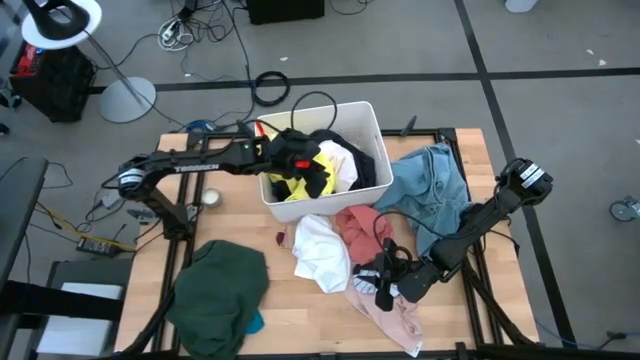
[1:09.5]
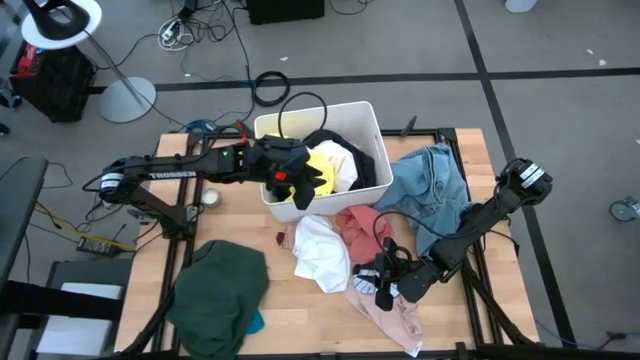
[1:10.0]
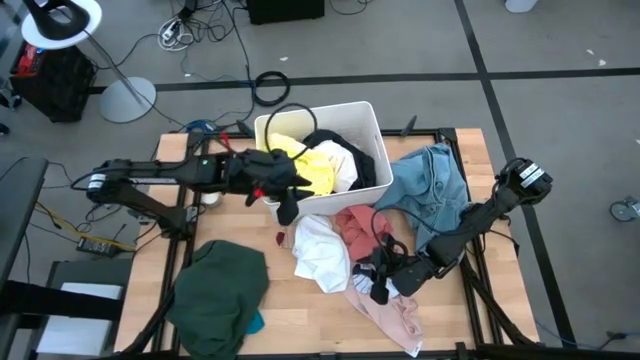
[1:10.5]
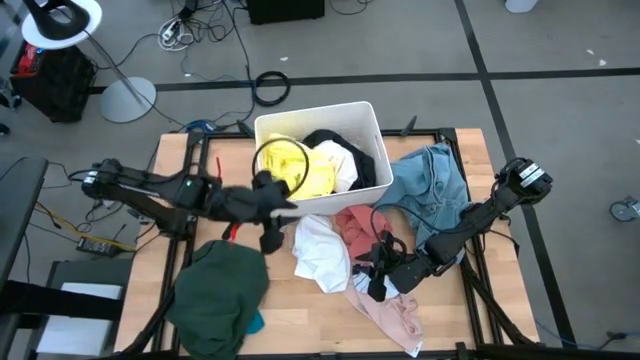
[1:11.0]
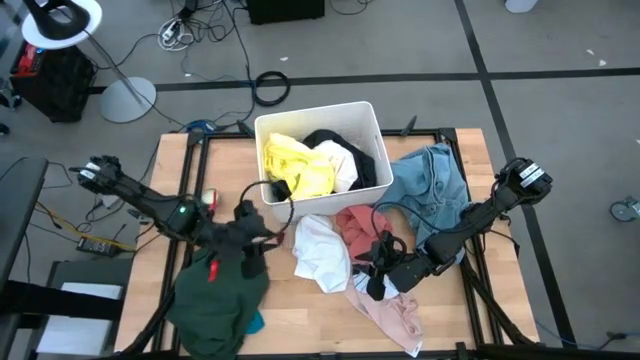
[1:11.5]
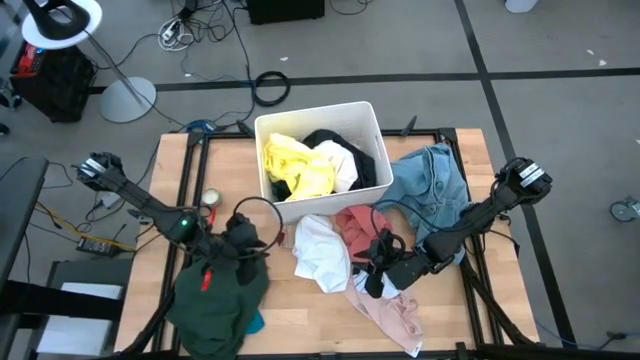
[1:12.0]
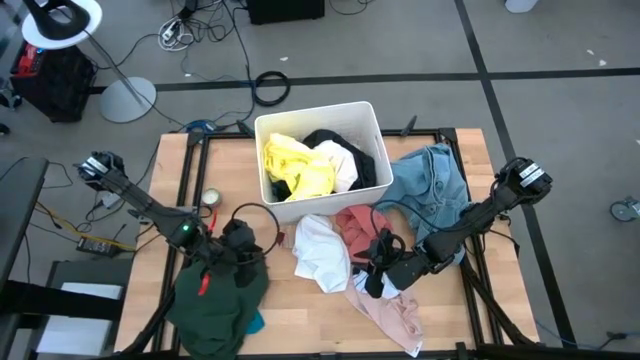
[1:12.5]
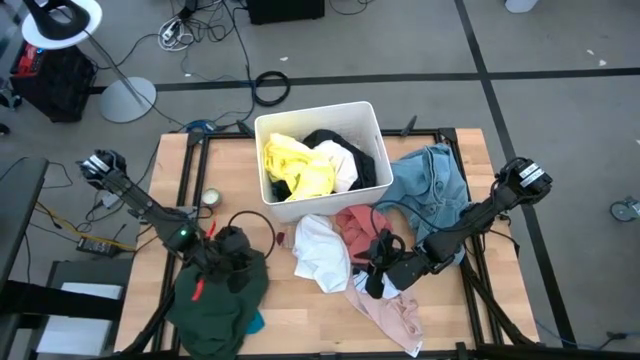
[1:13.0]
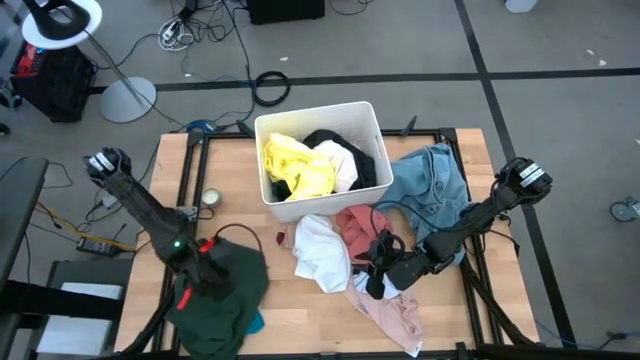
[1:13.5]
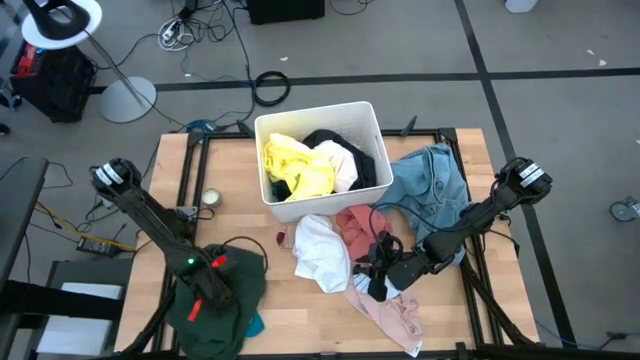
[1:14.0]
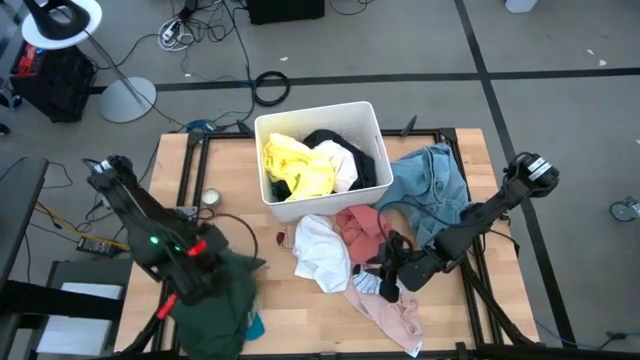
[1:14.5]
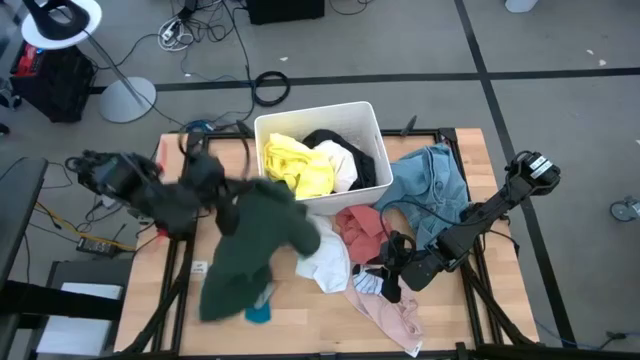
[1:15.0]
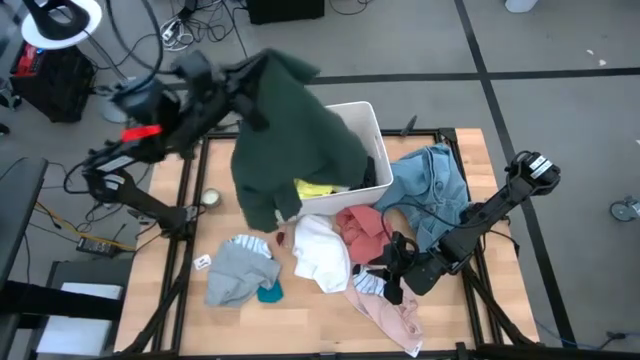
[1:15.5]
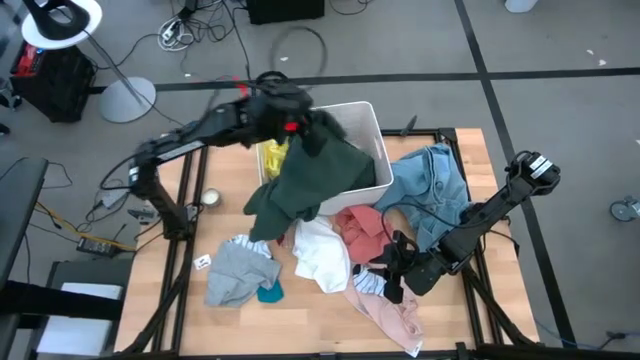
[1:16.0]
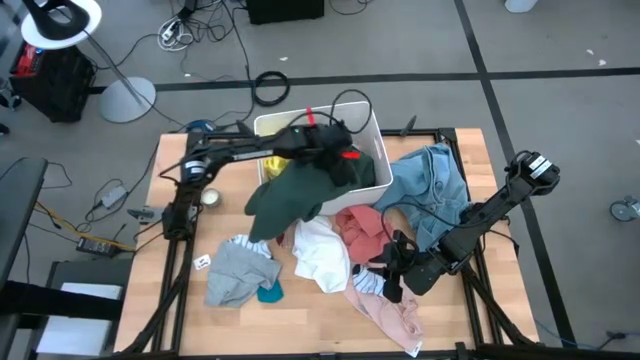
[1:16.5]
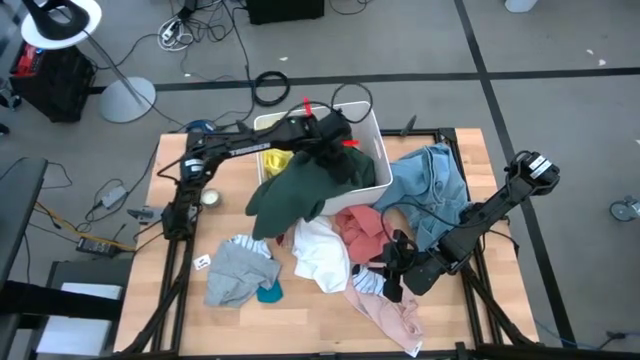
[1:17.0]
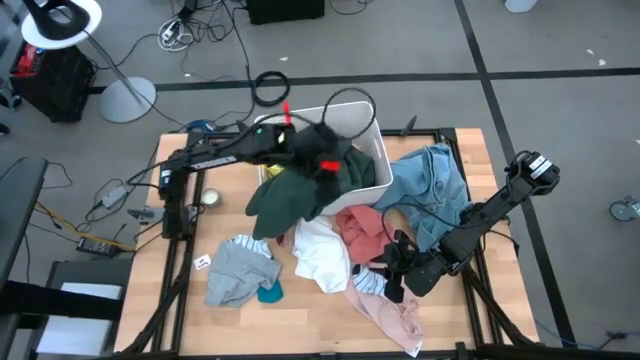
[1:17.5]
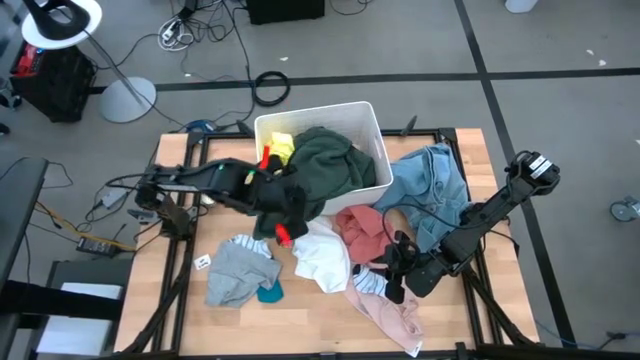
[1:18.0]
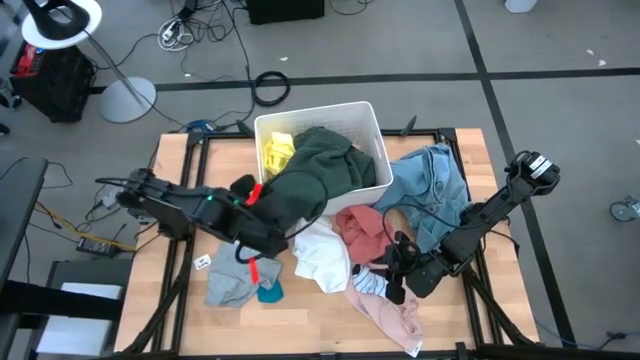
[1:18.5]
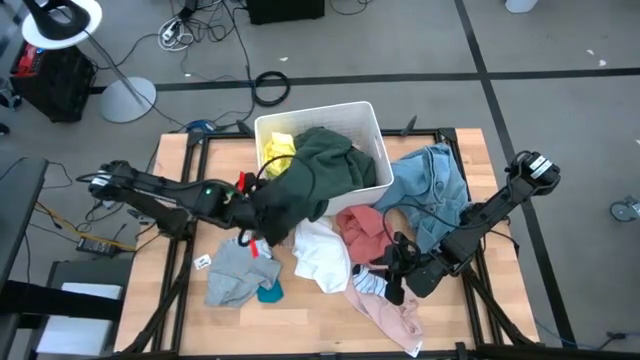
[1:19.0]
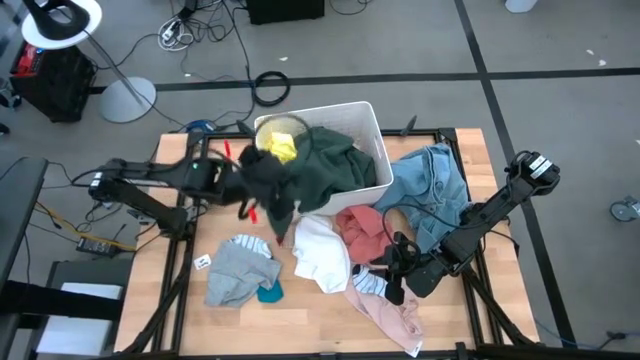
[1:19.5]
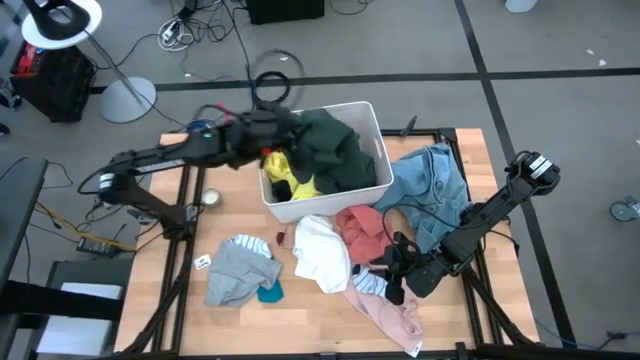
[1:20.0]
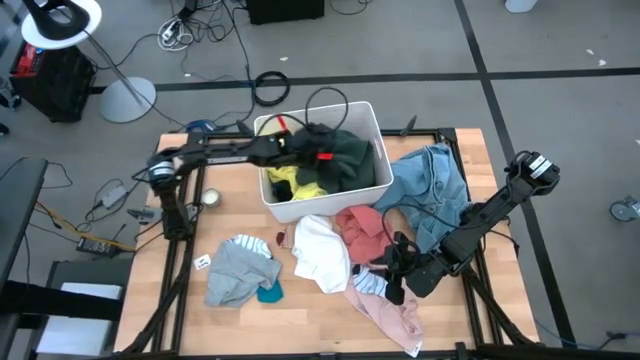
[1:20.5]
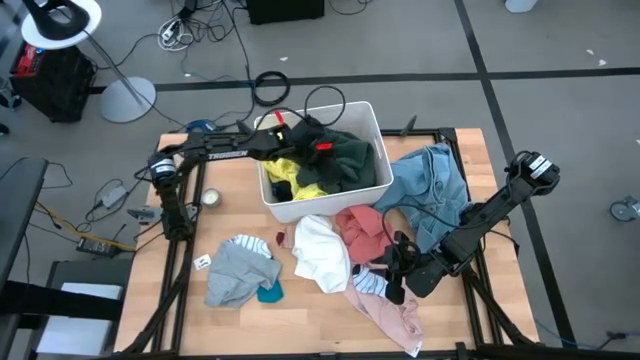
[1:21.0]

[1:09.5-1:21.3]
Task: Sort clothes
Put the dark green shirt into the white bin

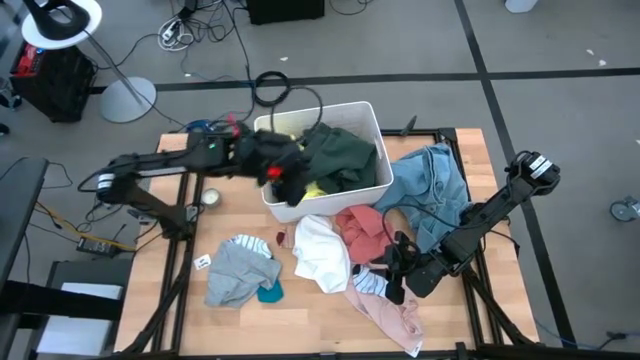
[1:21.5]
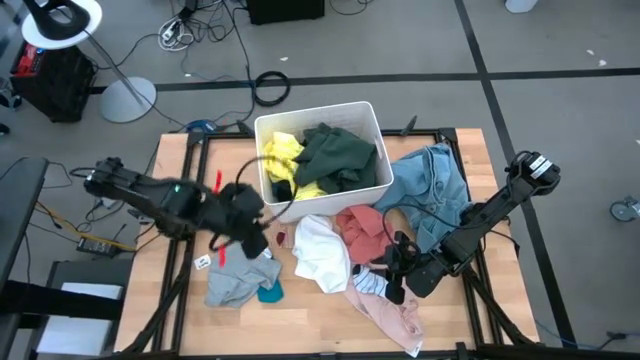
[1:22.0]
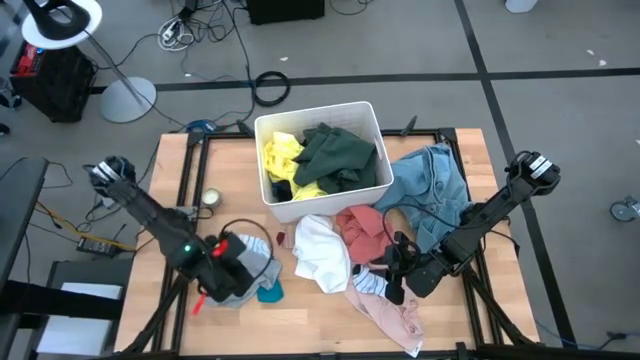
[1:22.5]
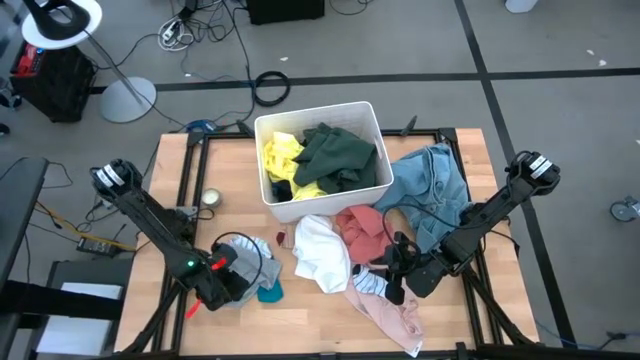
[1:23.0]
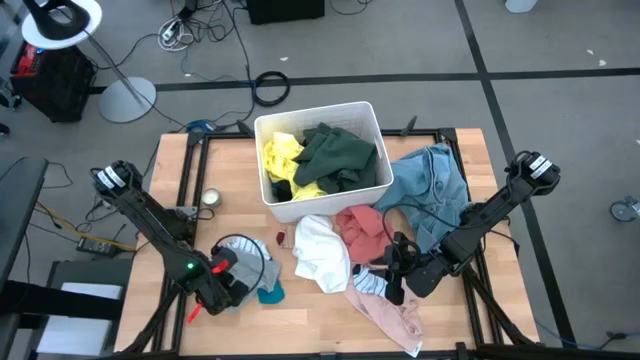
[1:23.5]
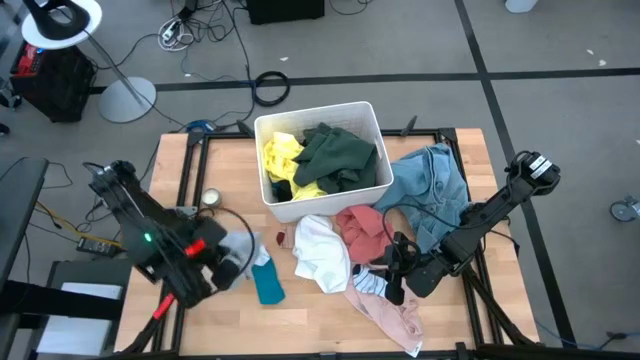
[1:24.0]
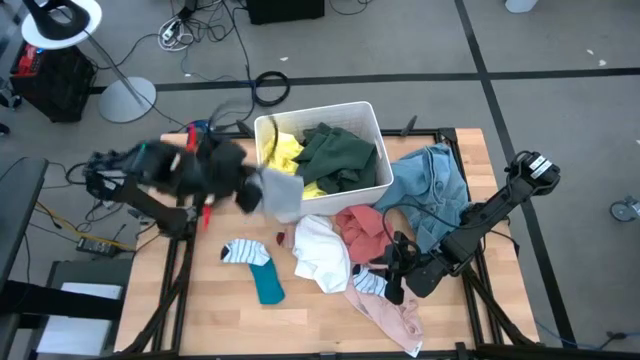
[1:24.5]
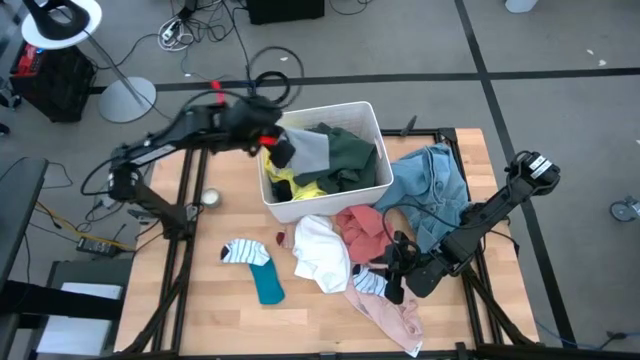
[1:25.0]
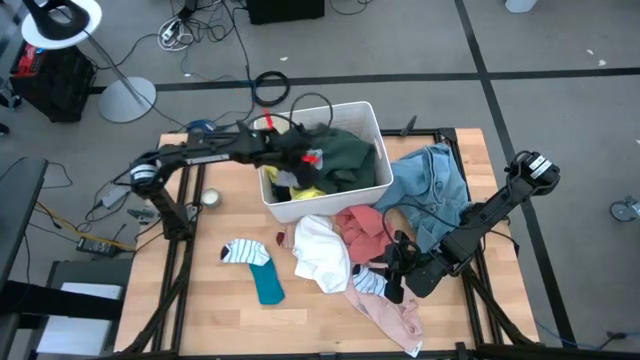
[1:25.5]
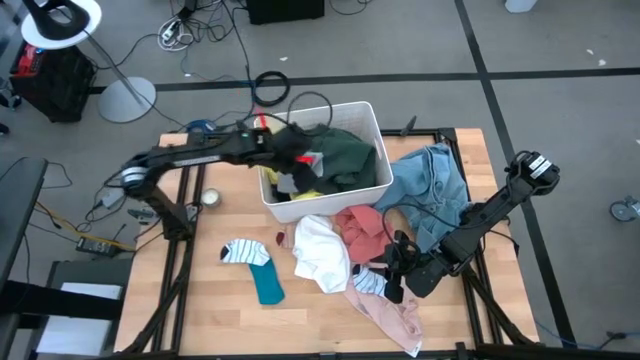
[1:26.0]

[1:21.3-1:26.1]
Put the gray underwear into the white bin

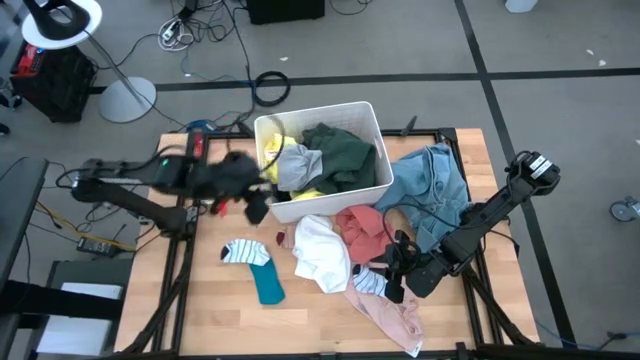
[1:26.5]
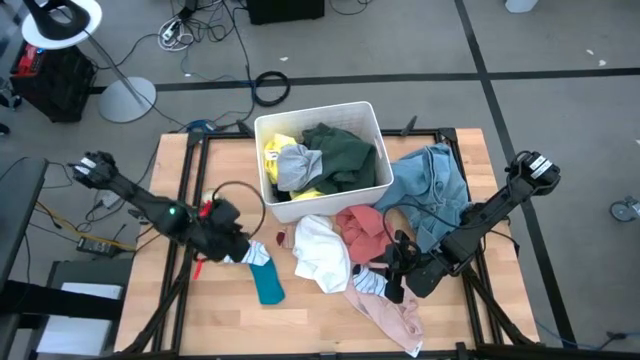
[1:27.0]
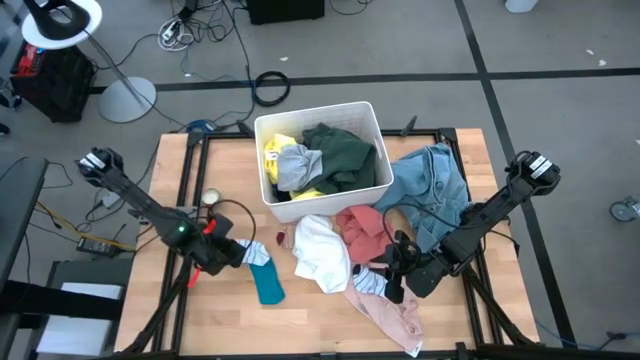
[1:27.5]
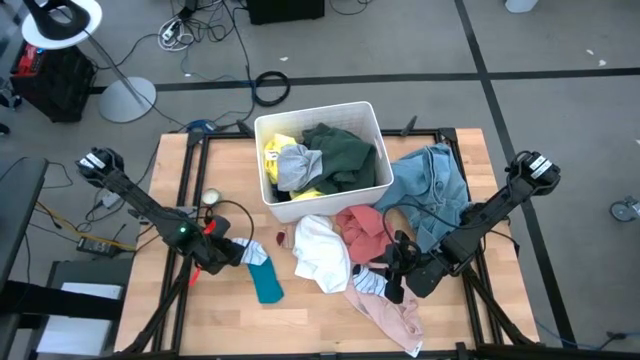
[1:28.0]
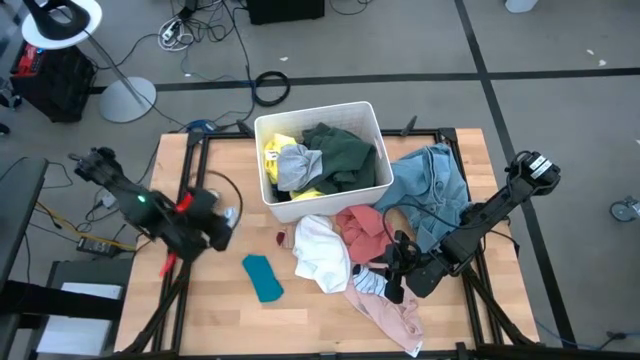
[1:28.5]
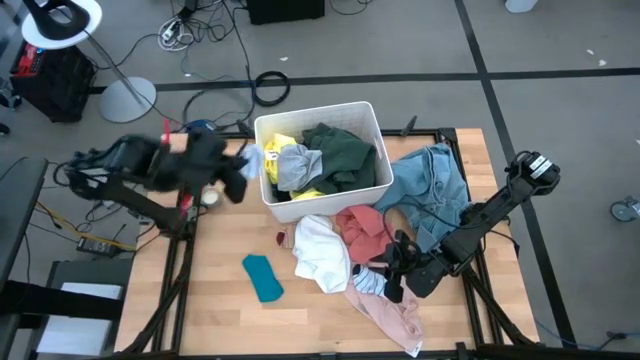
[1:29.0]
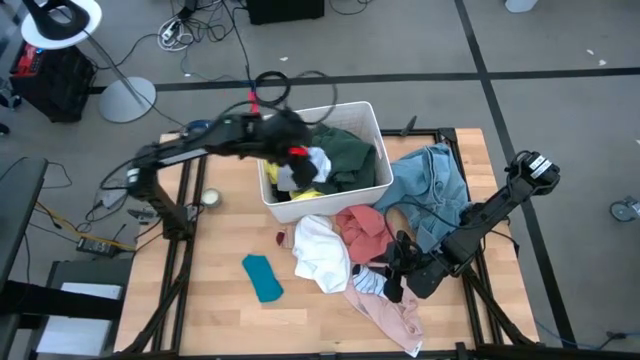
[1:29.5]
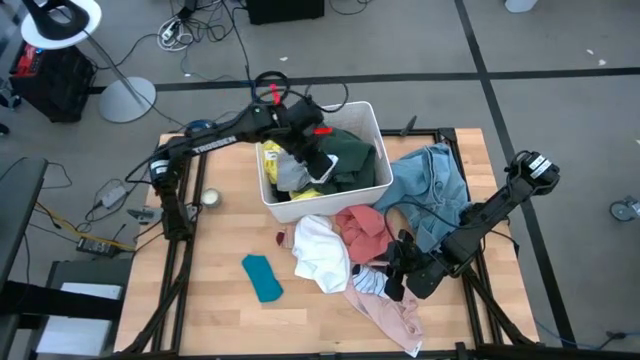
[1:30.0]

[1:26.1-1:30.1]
Put the left white striped sock into the white bin
